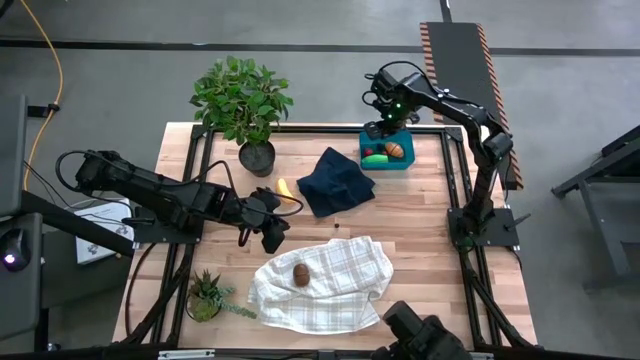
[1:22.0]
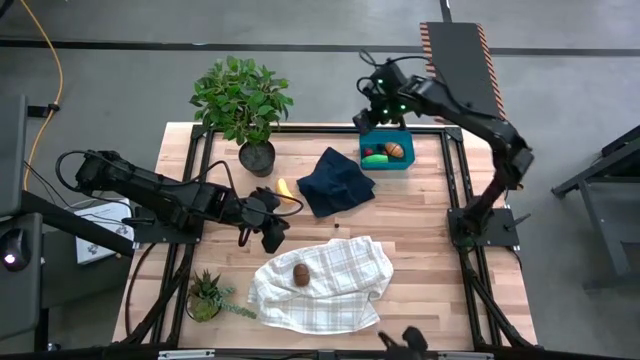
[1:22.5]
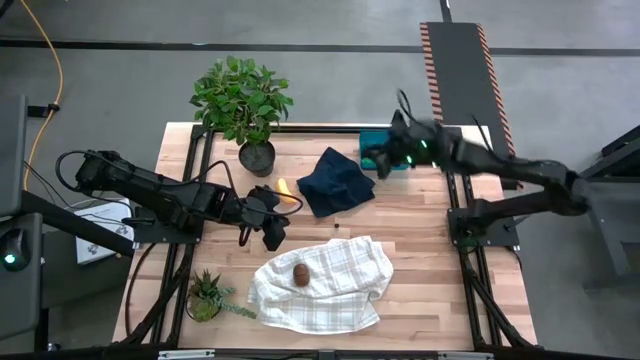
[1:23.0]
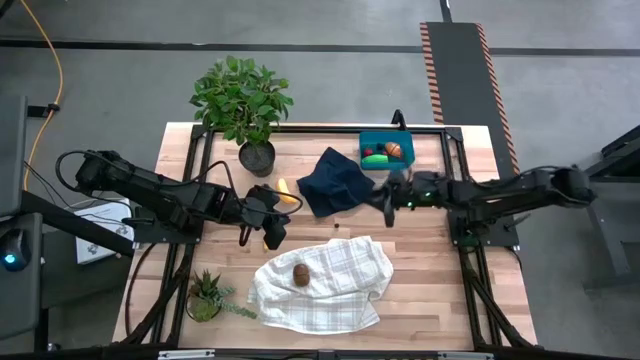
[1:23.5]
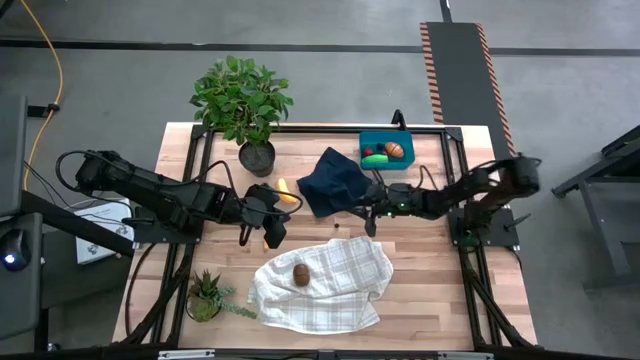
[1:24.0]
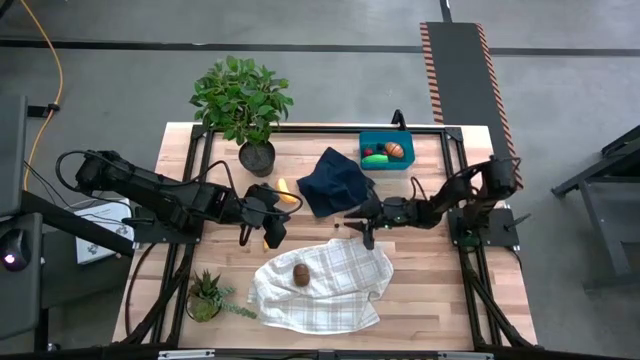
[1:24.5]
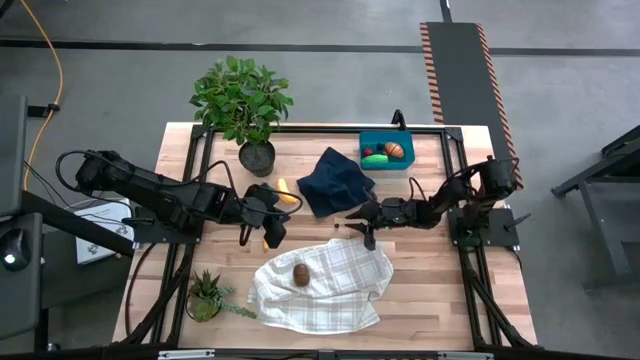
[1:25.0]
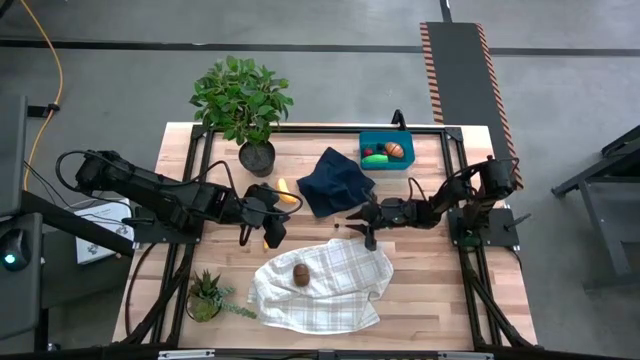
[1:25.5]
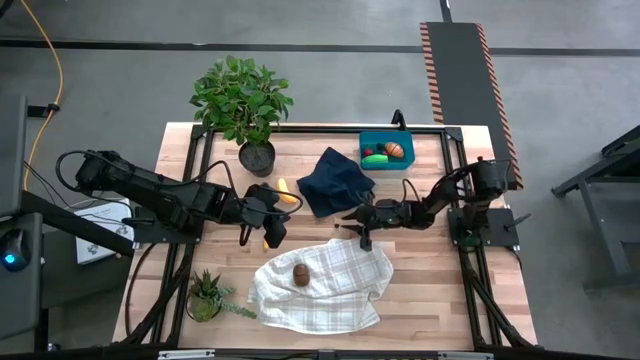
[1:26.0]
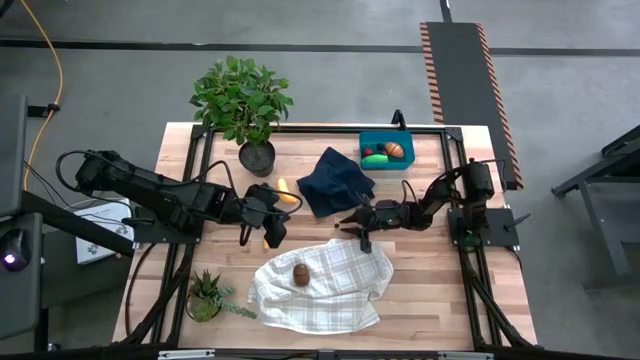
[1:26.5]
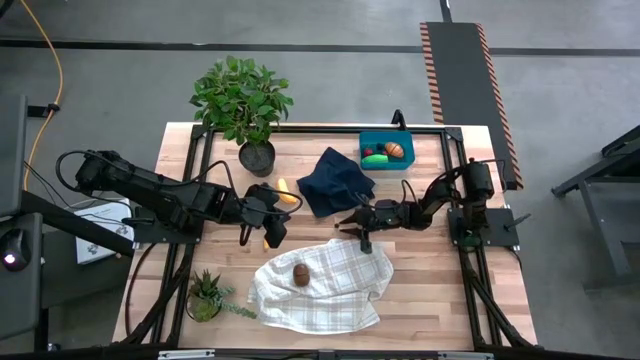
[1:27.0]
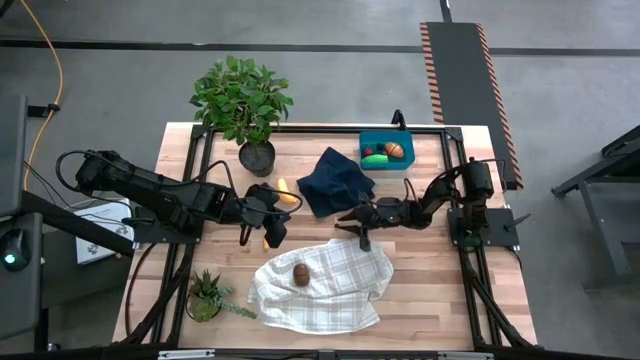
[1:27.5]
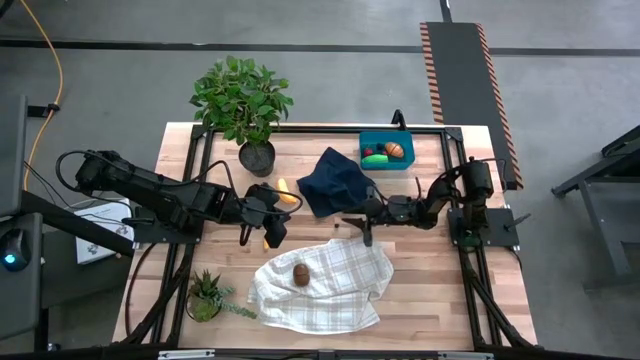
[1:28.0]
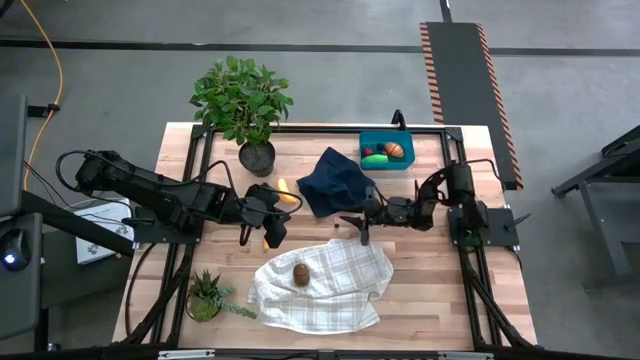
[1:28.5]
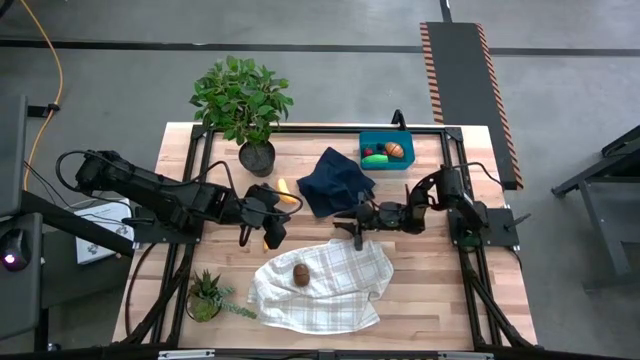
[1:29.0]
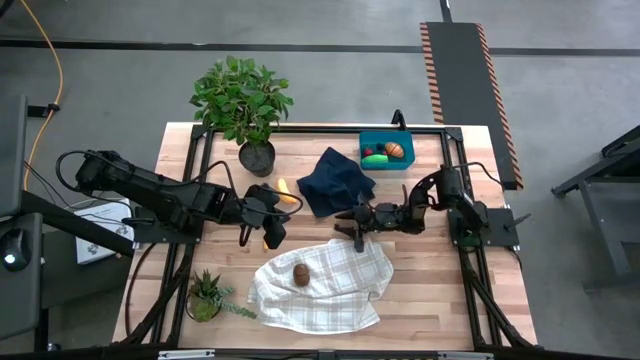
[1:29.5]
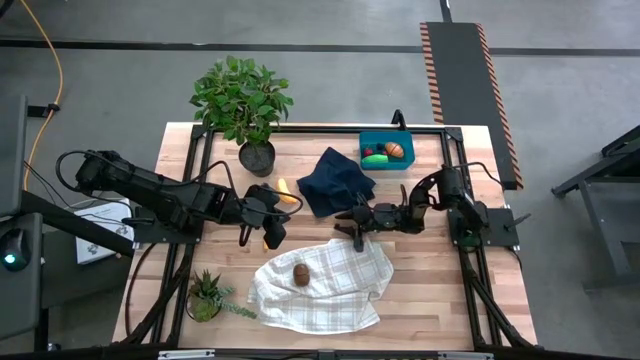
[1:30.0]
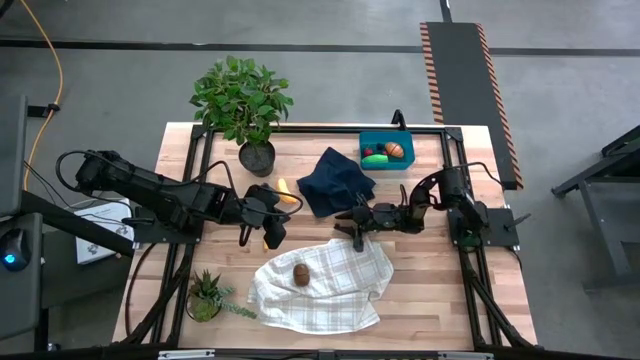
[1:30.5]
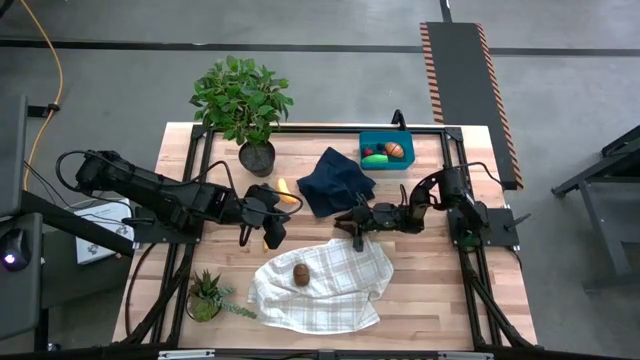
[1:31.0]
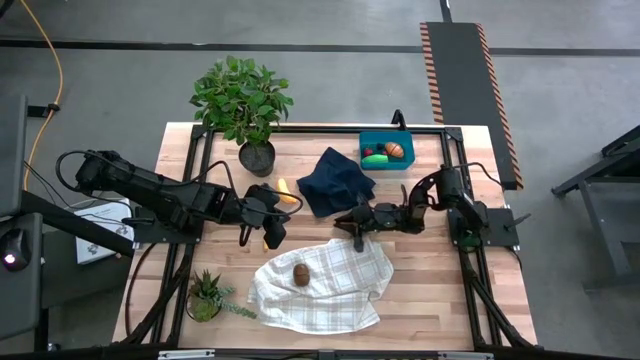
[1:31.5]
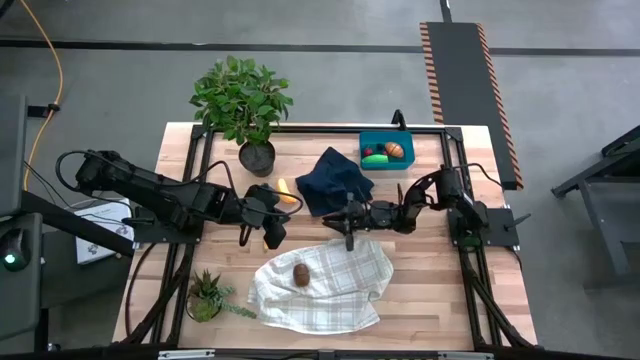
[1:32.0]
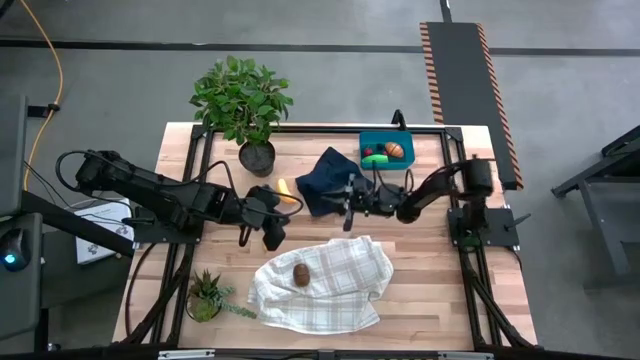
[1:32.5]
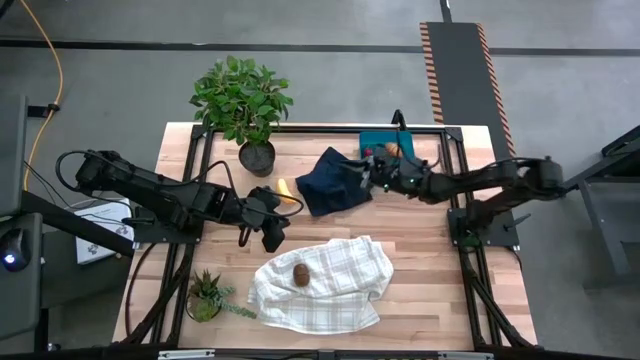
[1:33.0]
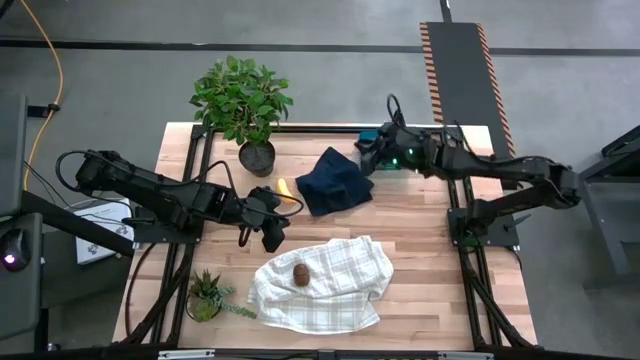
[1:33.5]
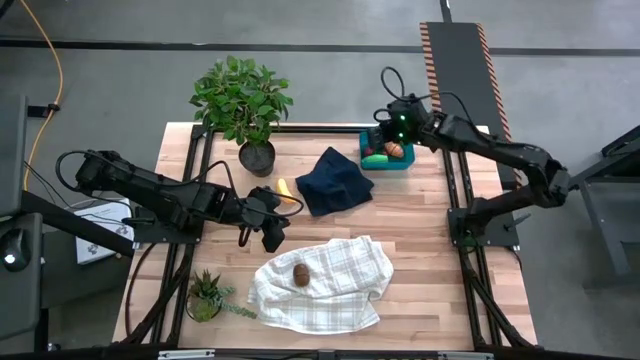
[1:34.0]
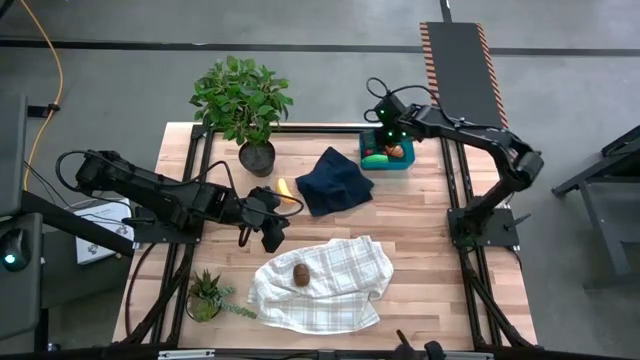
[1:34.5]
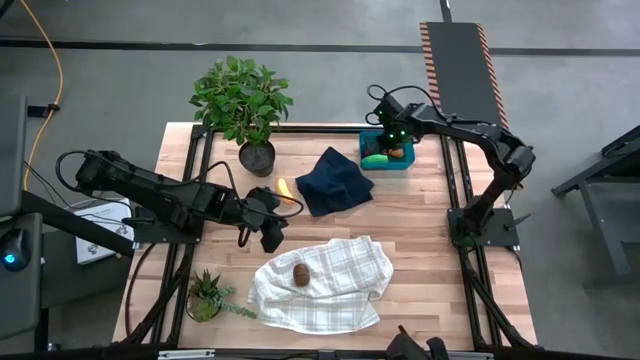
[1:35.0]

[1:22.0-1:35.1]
Task: Pick and placing Produce into tupperware
Put the blueberry into the blue bin

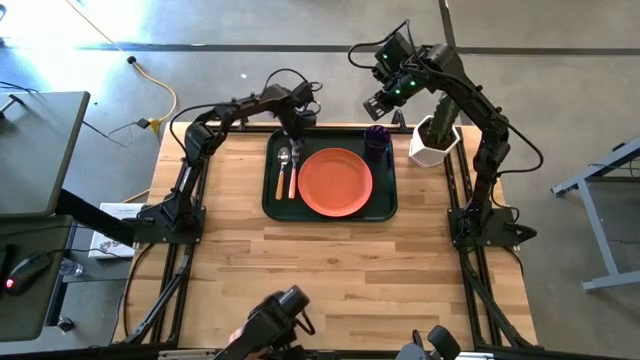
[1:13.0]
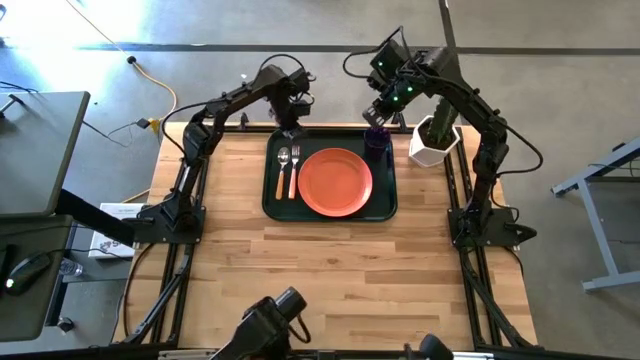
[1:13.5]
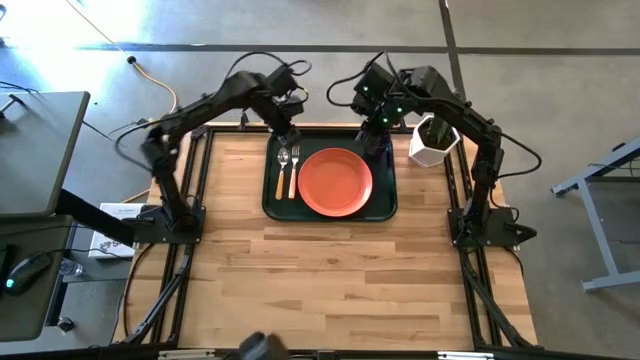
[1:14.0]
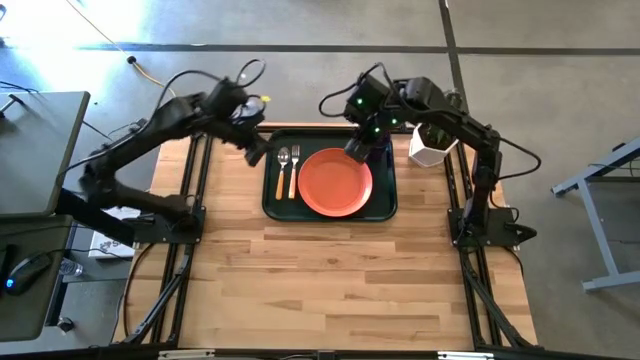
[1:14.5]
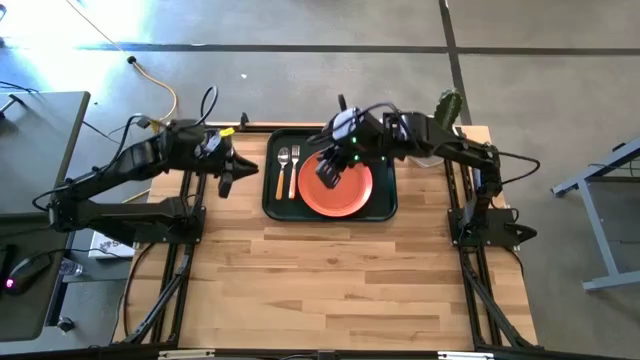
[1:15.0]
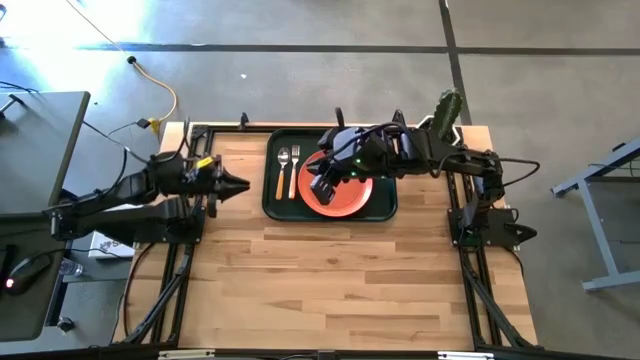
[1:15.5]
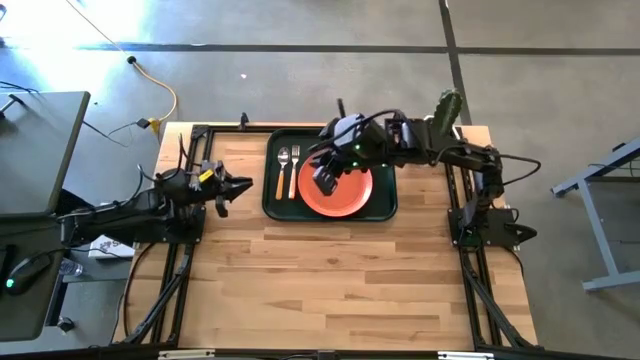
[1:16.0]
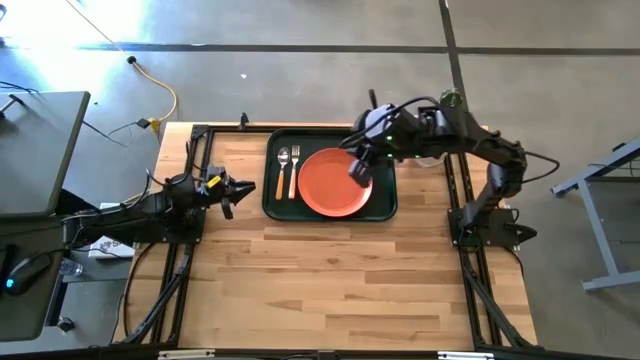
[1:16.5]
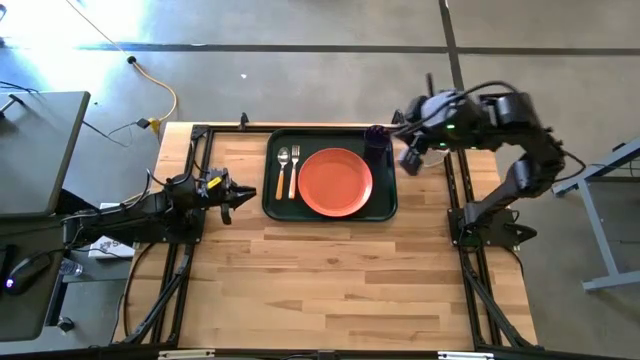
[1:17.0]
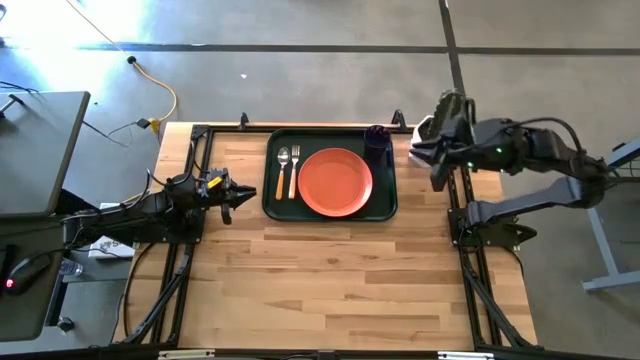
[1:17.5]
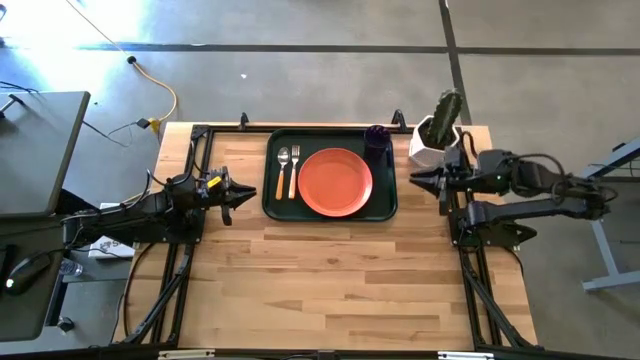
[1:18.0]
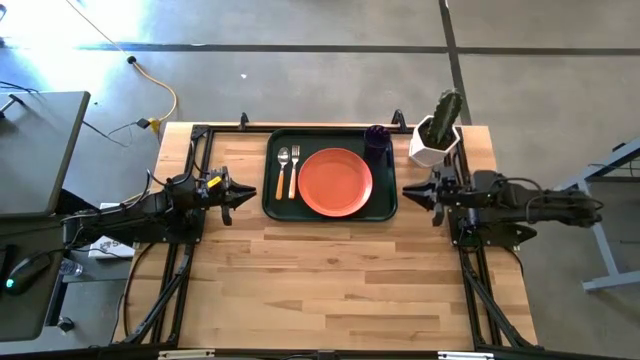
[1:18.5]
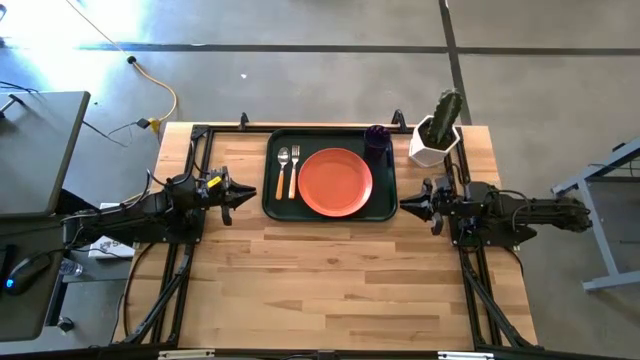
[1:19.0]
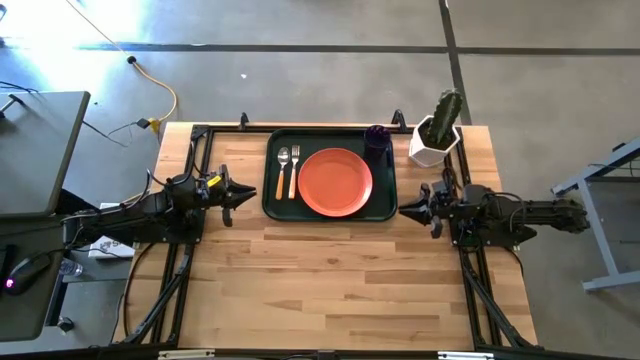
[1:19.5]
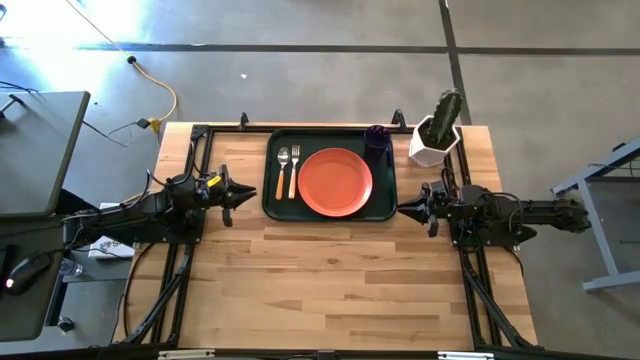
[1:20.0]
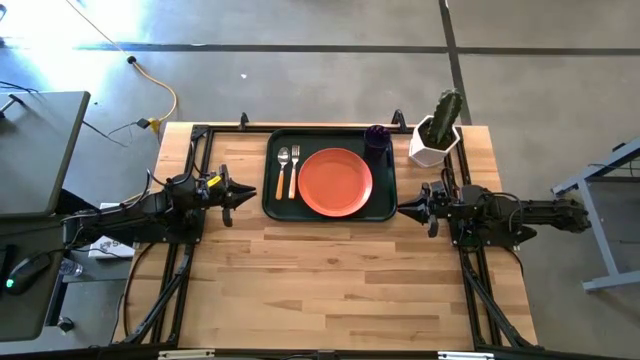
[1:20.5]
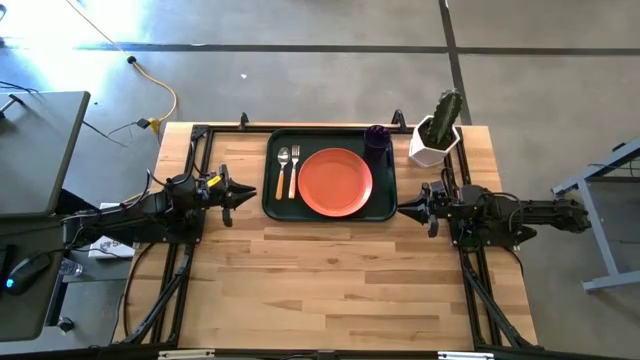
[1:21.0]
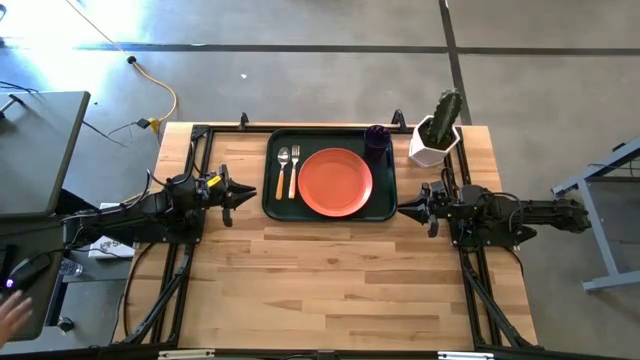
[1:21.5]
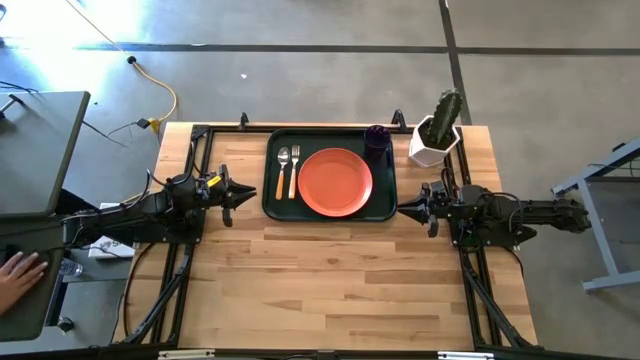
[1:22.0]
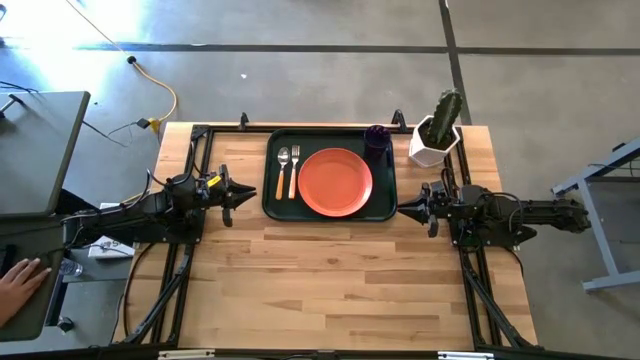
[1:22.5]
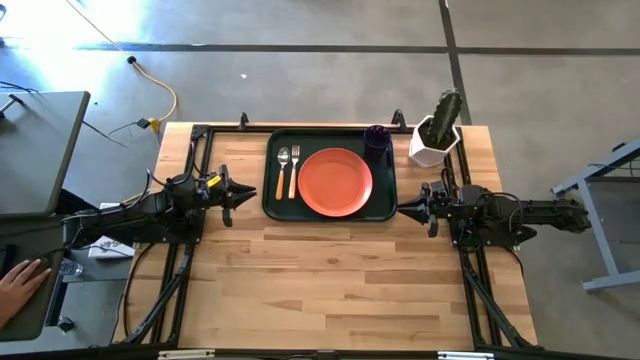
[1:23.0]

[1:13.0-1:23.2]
Task: Pick and place plate/cup/fork/spoon on tray
Return to Home Position
